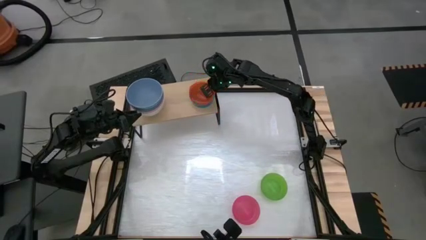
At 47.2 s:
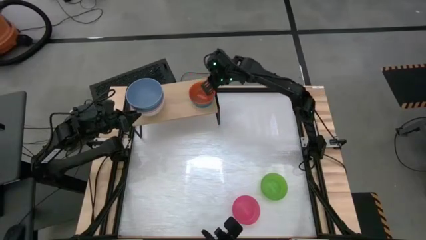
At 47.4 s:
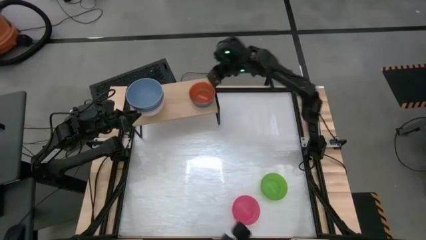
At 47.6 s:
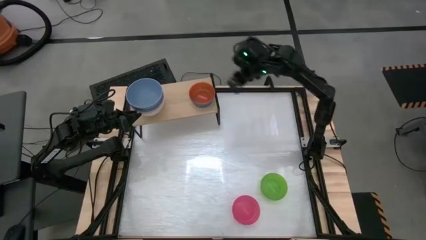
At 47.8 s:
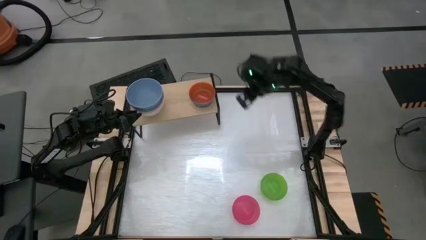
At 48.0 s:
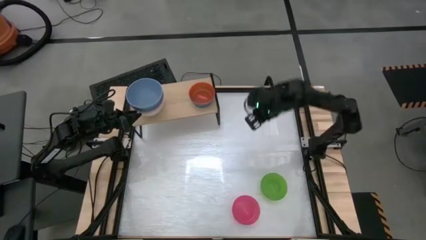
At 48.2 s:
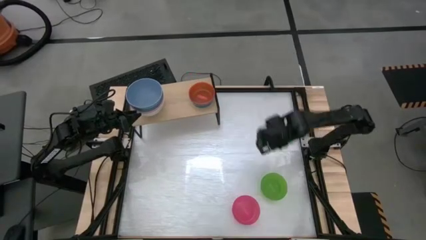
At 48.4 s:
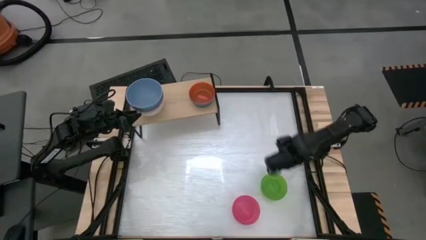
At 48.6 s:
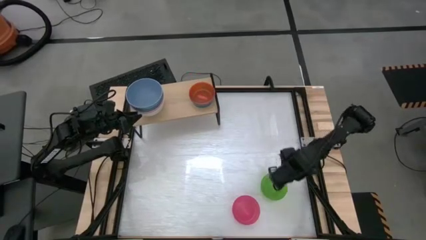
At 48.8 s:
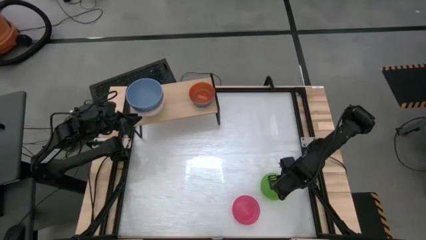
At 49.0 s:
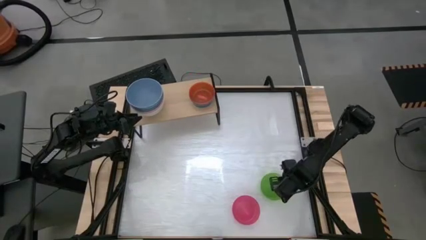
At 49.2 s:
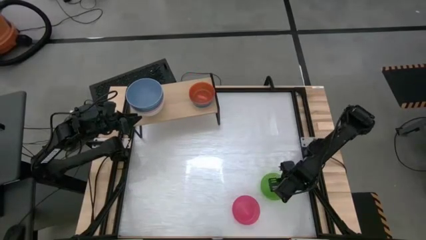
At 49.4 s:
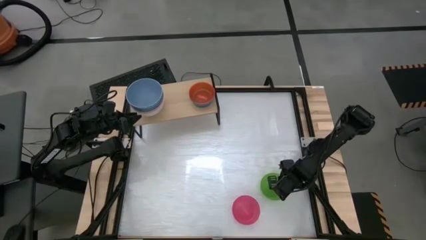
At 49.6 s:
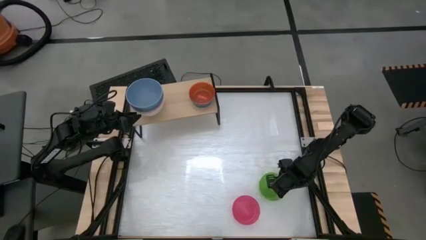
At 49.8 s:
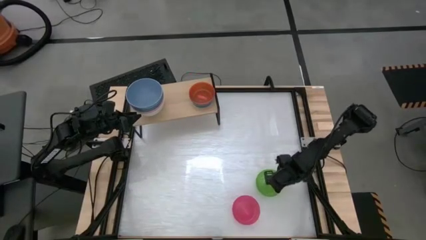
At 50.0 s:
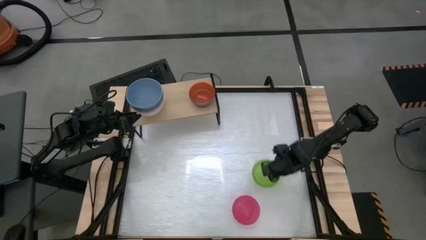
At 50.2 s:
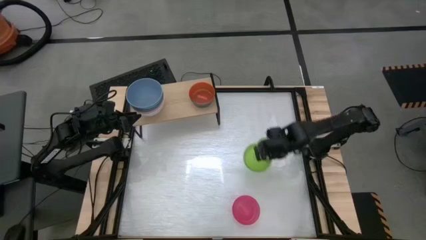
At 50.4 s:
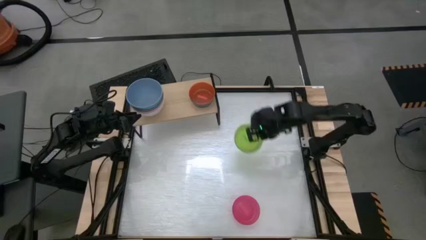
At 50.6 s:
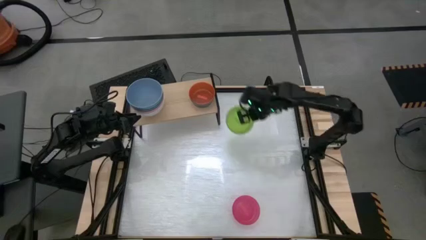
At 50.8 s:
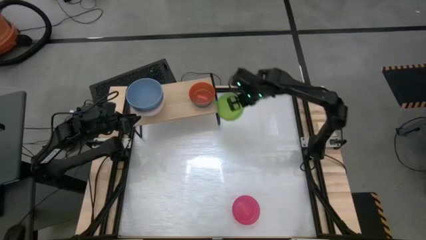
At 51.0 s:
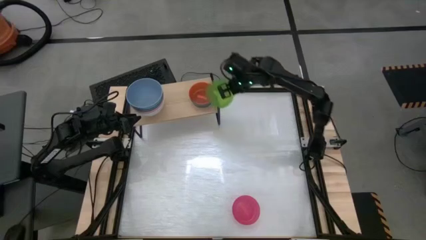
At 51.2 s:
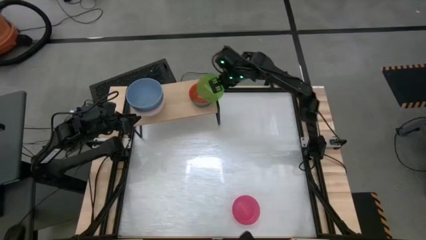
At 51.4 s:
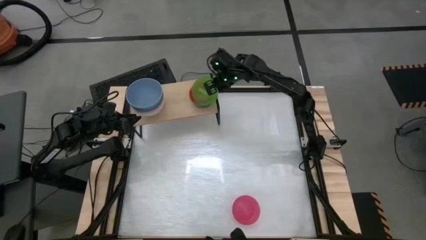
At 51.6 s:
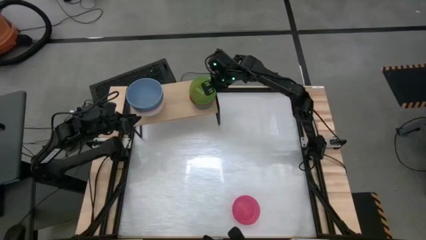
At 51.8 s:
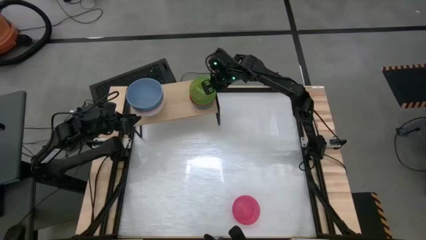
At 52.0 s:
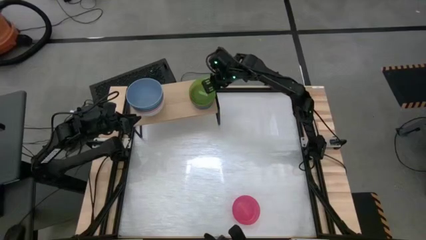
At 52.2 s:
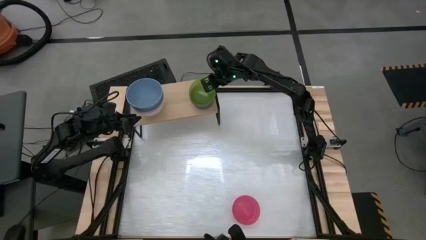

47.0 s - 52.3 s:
Task: Place and stack bowls onto a shelf
Stack the small green bowl on top of the small orange bowl on the shelf

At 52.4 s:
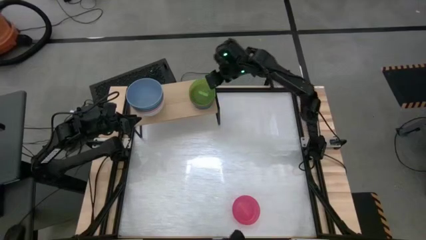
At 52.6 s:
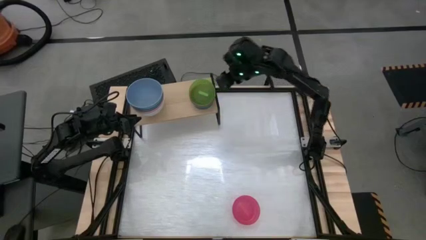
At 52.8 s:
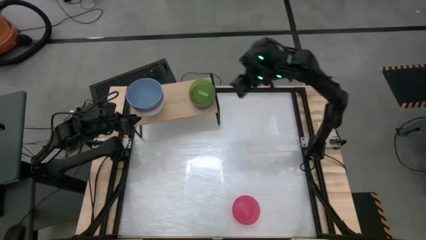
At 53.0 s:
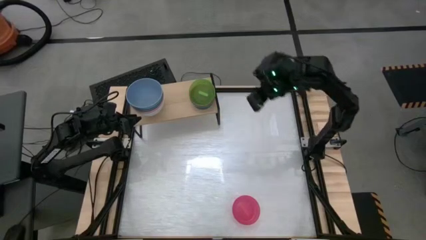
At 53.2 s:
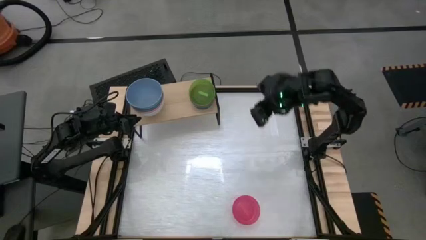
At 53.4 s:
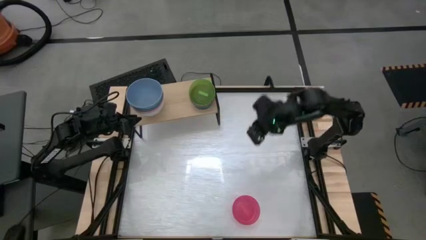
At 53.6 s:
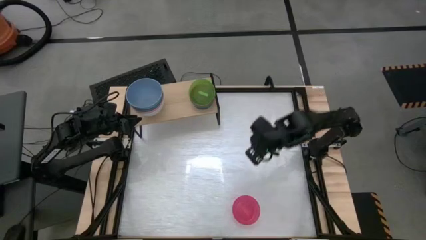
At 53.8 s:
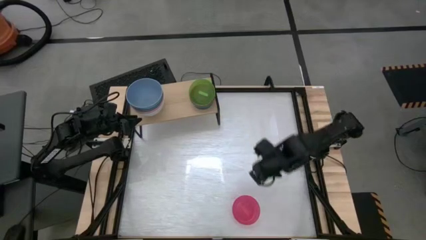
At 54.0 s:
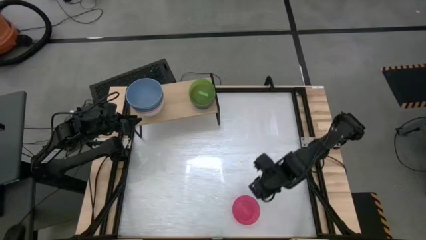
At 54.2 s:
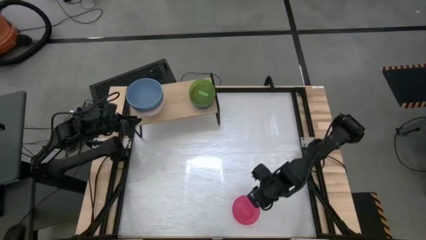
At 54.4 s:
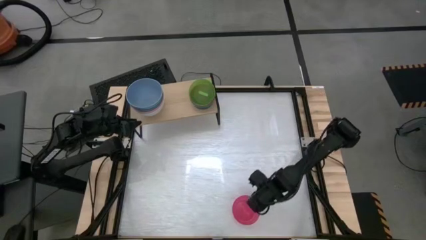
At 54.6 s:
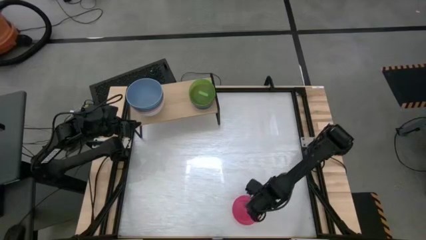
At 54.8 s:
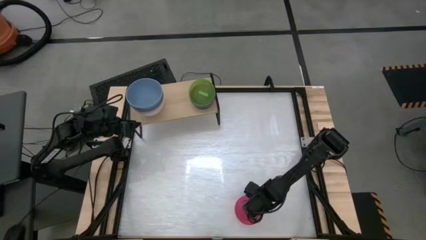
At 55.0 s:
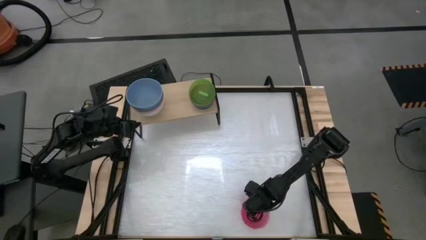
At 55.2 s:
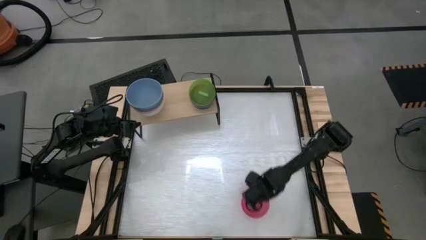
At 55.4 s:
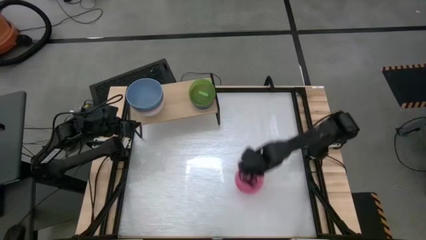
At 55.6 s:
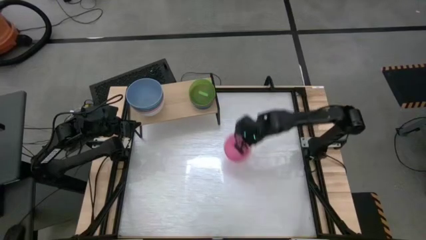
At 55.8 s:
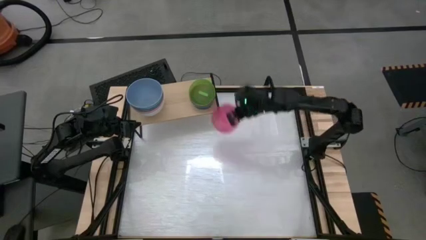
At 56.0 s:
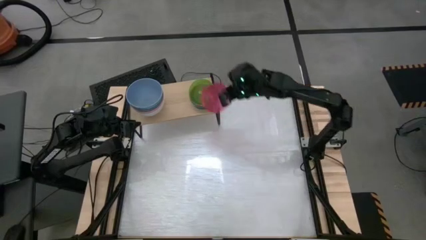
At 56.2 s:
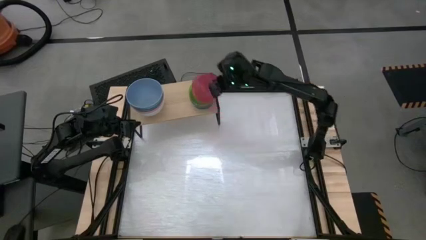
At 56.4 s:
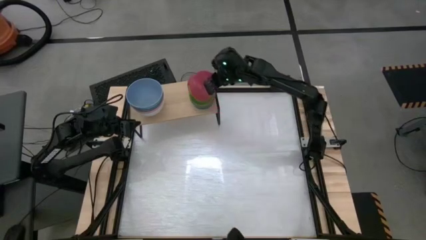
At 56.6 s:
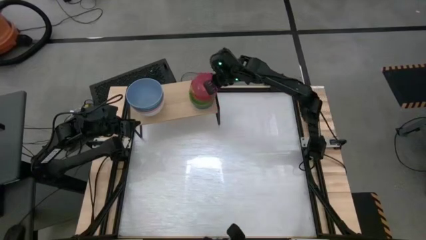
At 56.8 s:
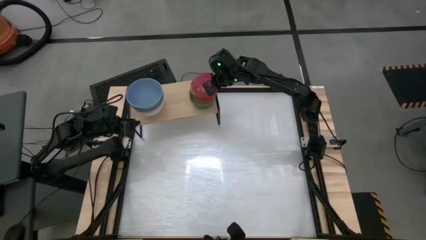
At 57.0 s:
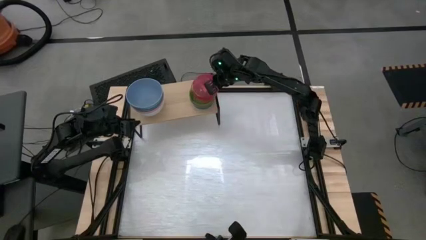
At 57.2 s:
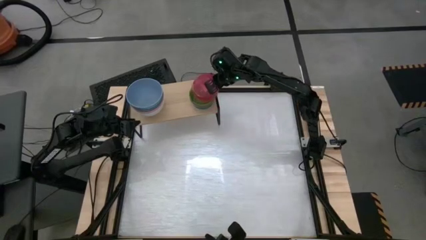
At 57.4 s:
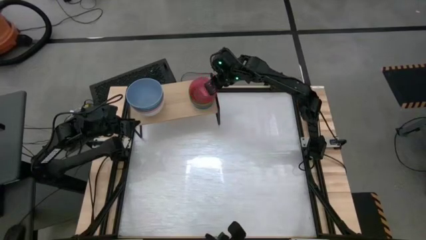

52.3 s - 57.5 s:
Stack the small pink bowl on top of the small green bowl on the shelf

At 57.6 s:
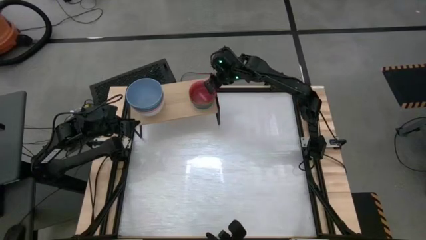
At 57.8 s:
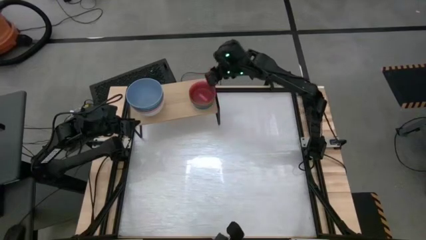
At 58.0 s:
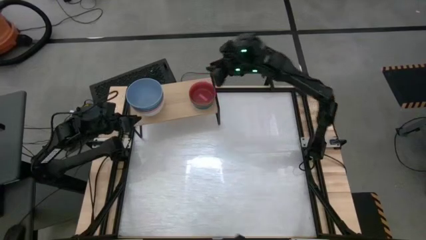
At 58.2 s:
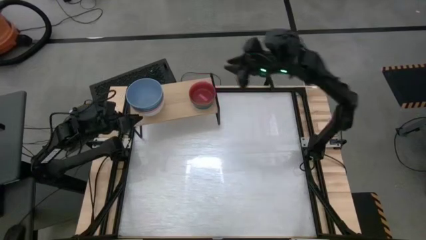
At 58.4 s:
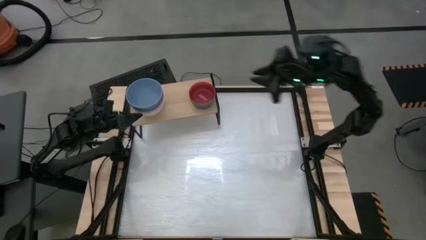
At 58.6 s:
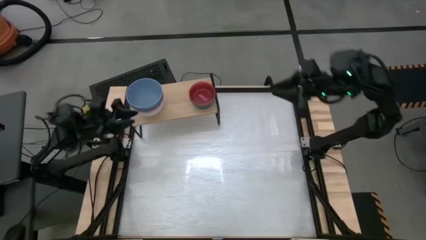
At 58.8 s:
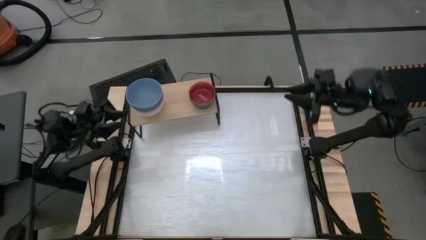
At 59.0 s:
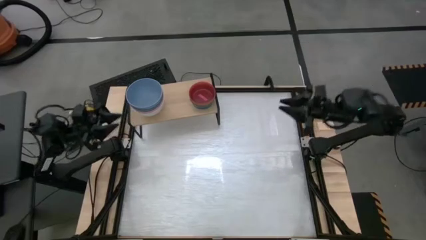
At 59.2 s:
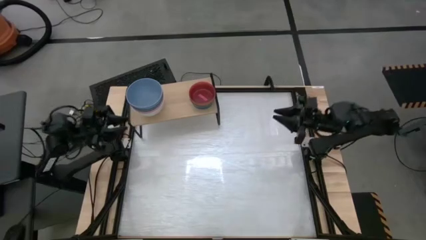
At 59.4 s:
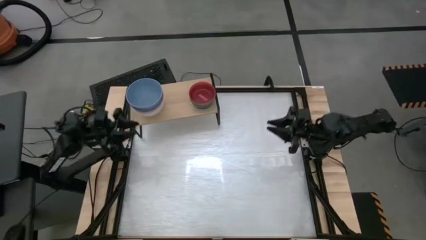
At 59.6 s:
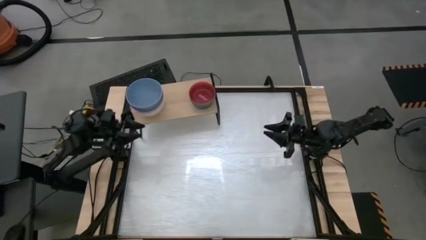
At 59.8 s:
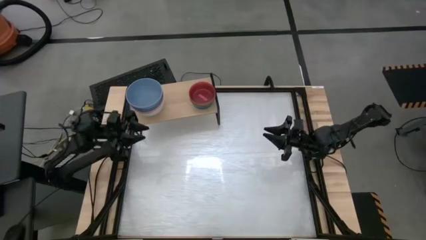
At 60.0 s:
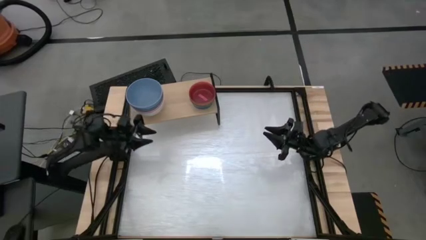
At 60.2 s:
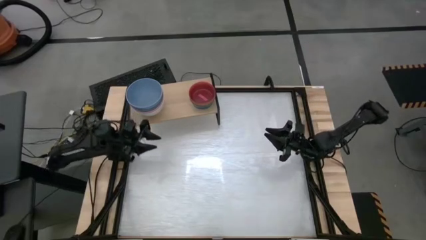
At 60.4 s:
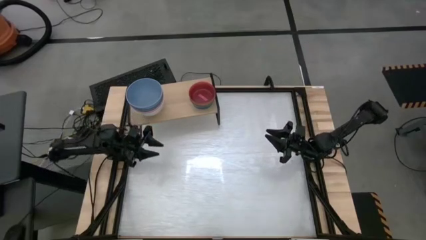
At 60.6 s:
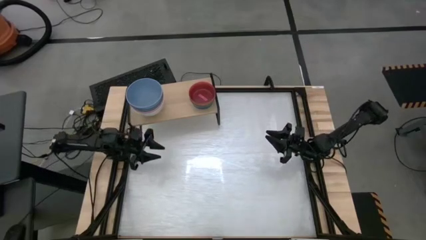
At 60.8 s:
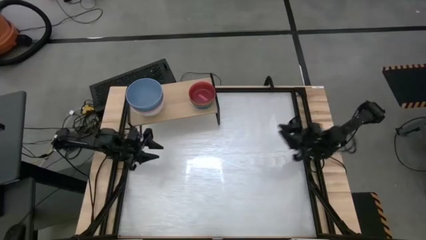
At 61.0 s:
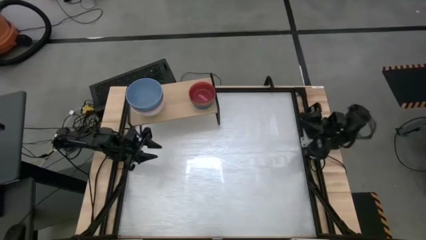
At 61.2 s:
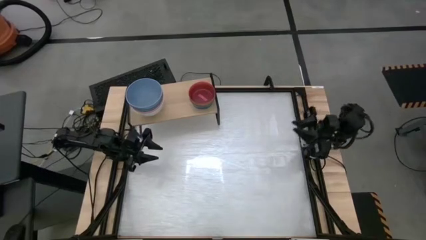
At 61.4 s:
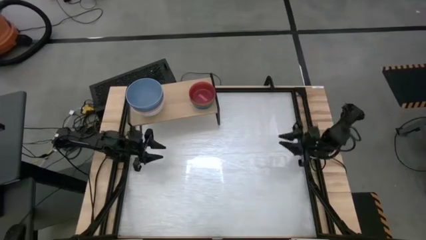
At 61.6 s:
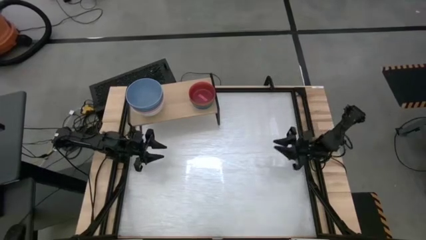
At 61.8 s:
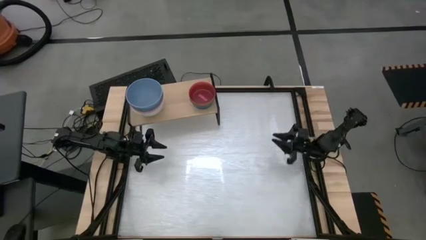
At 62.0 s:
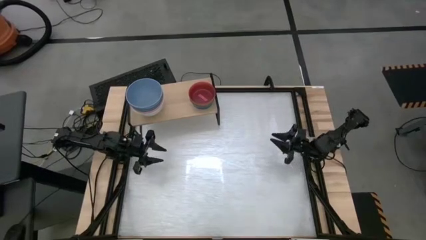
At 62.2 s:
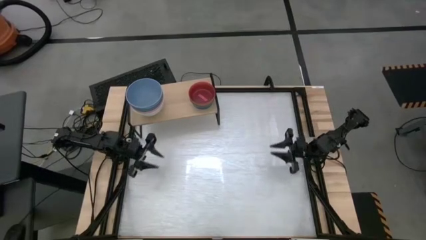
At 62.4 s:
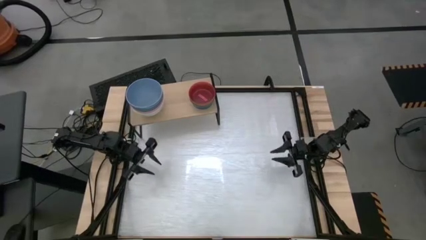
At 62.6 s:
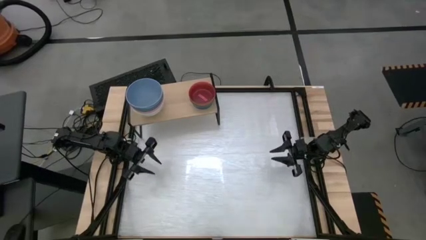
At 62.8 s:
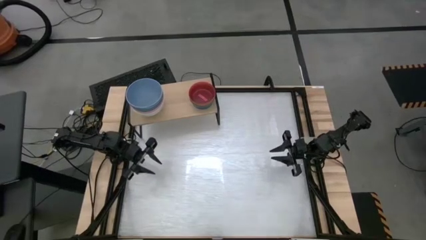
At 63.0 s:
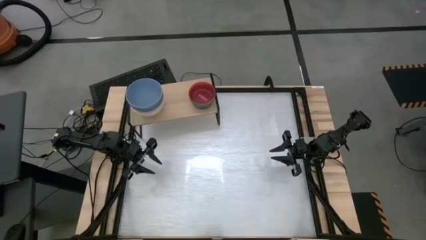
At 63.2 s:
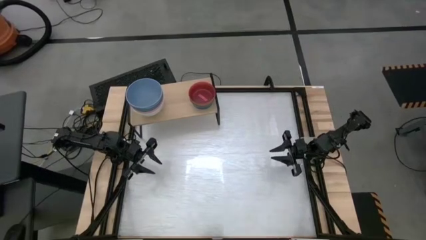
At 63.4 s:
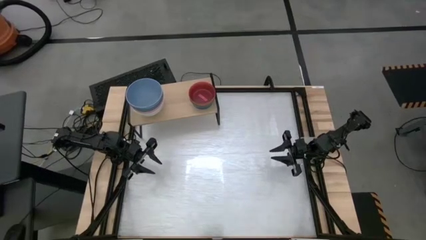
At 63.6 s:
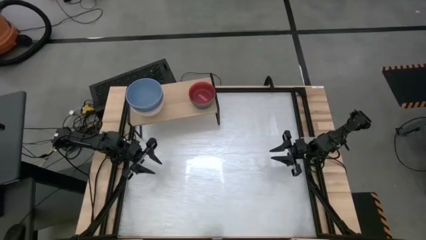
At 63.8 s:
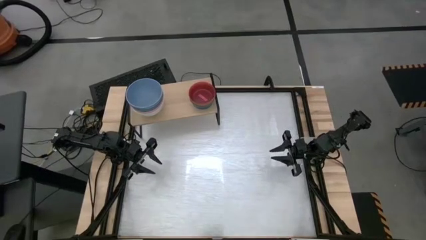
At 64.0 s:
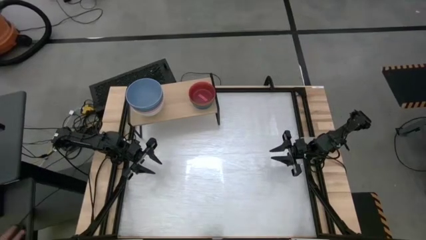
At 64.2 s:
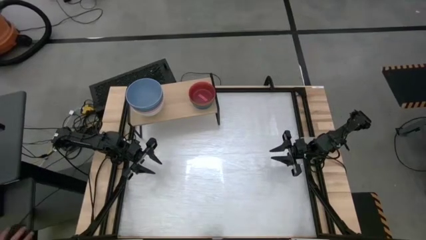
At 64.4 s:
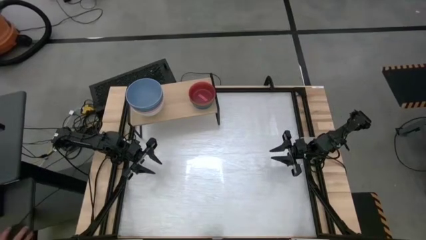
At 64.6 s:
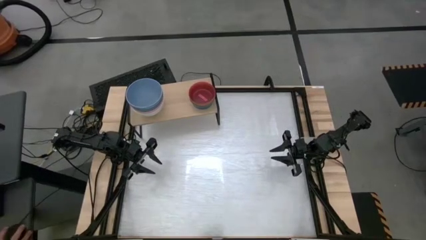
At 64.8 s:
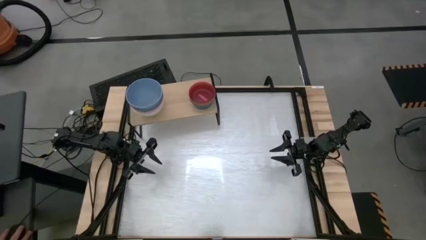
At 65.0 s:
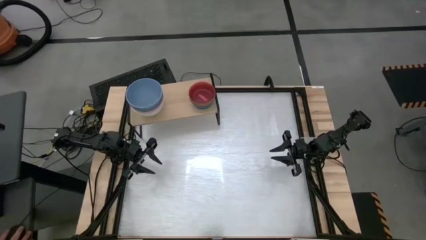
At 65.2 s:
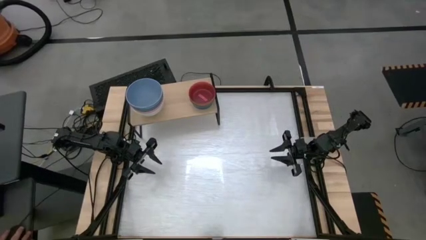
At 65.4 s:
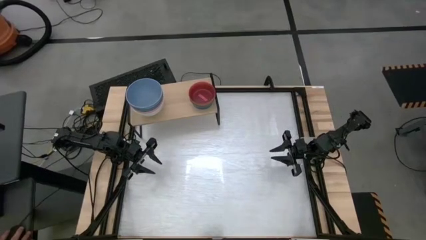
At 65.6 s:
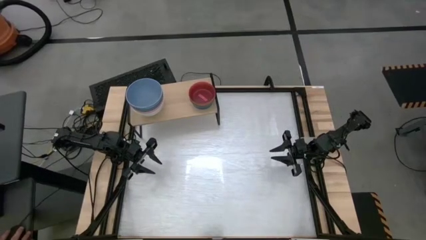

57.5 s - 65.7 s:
Return to Home Position
